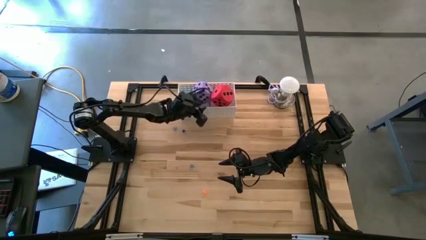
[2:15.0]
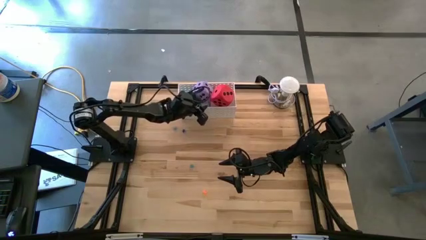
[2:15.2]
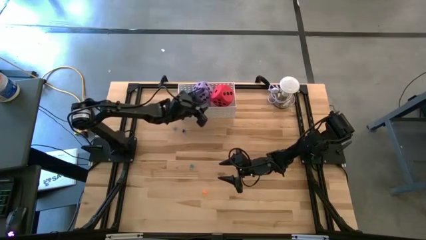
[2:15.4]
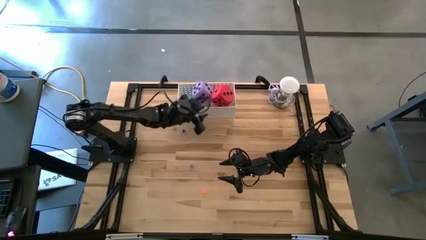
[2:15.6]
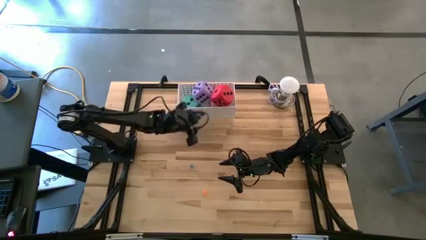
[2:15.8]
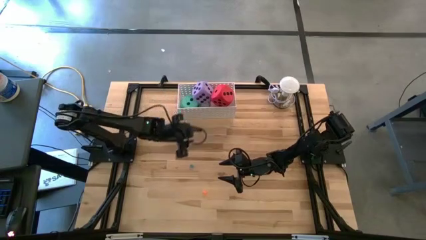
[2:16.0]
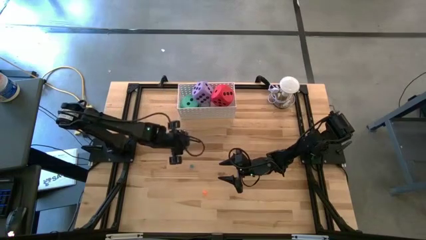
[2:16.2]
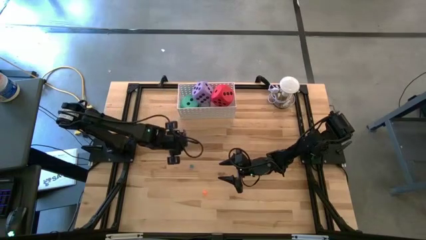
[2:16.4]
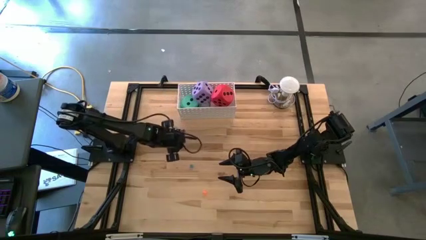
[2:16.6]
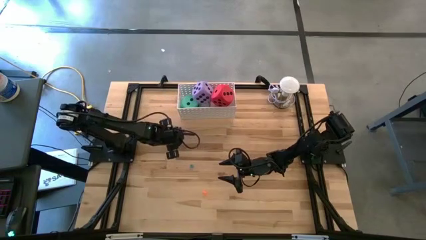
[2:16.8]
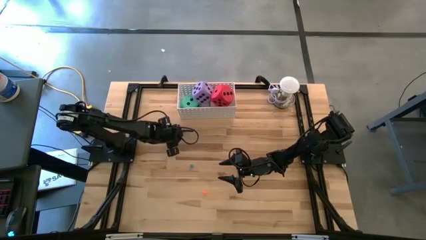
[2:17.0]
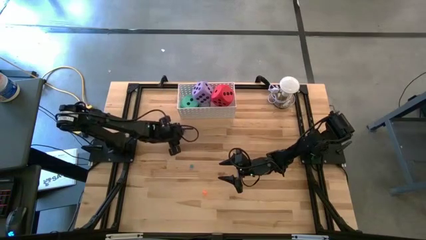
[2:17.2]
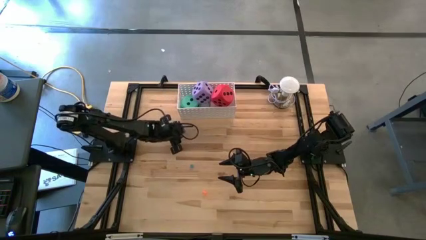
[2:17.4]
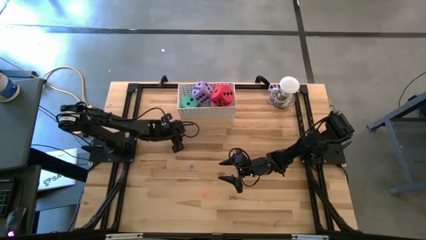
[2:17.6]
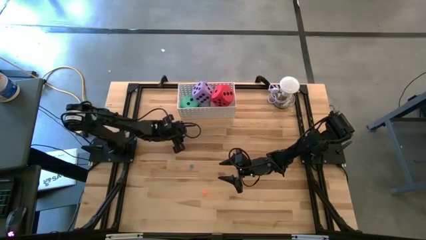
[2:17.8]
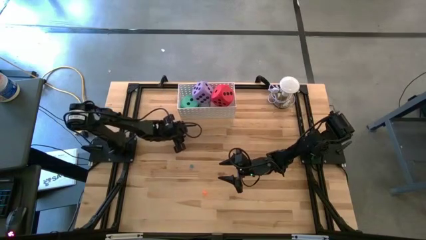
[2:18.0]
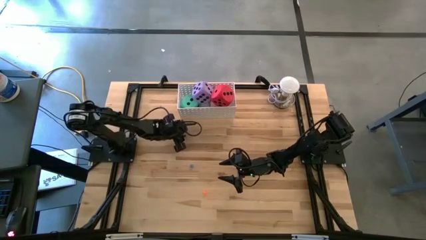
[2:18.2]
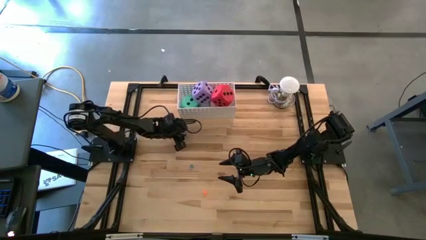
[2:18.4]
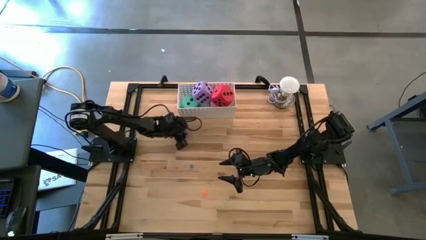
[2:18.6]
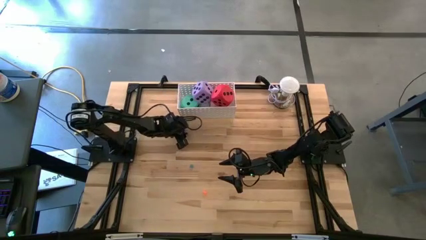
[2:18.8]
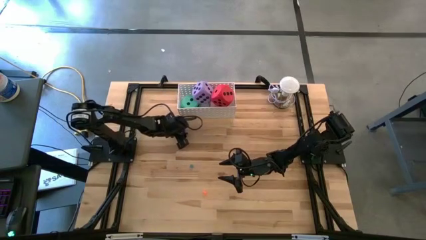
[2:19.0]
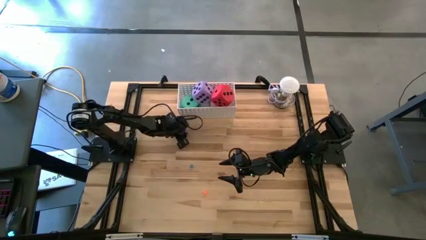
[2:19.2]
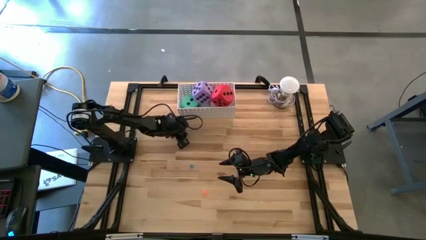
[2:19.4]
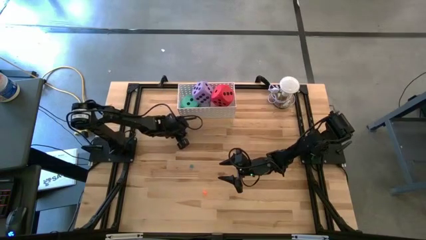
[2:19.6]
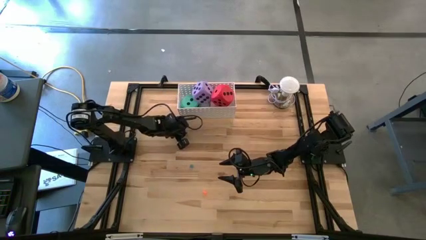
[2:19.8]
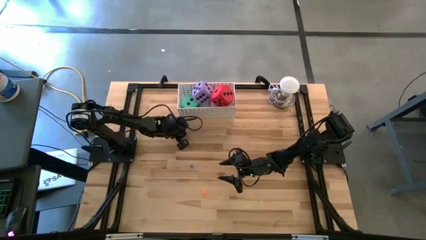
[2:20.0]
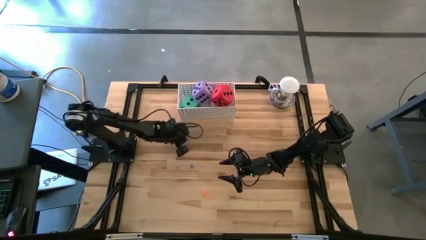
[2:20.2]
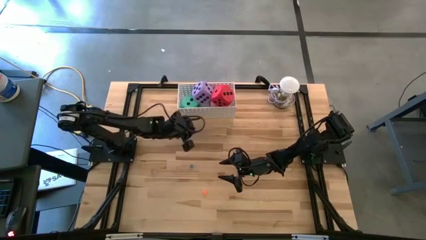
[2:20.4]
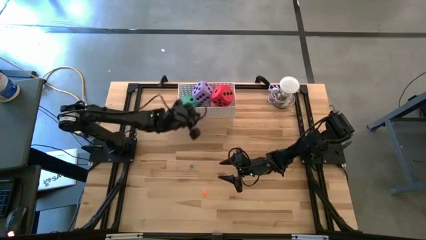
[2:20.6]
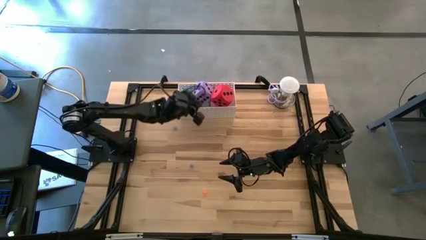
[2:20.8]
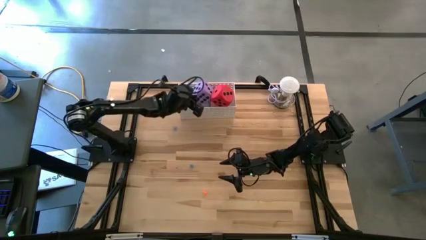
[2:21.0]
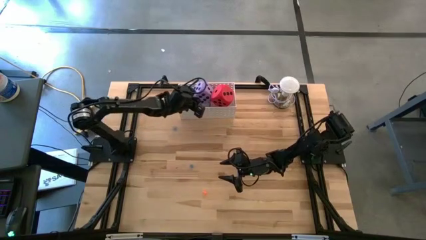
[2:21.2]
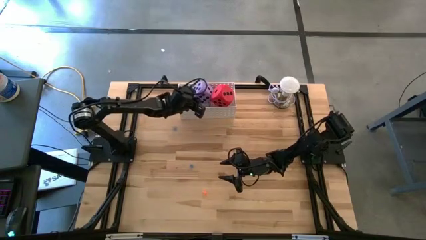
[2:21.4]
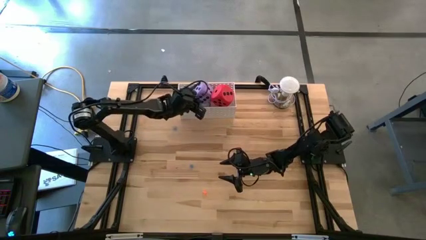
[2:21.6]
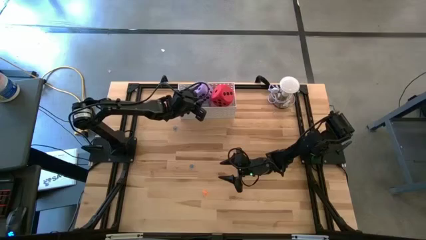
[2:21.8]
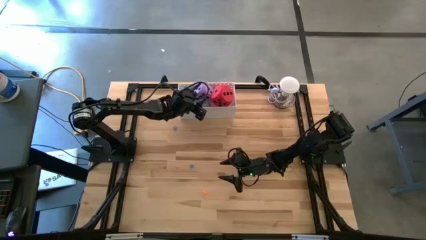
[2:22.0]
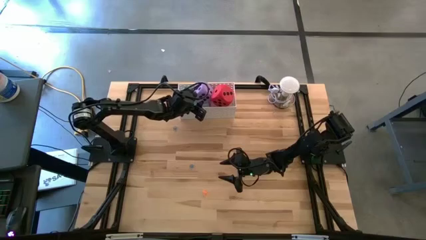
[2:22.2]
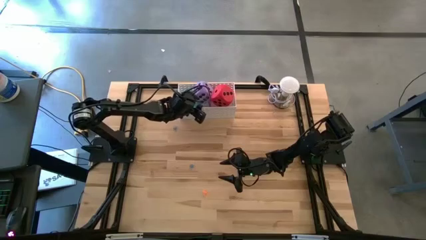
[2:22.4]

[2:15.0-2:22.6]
Task: Pick & Place Dice
Put the small dark blue dice into the white basket

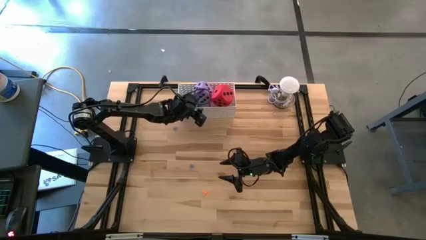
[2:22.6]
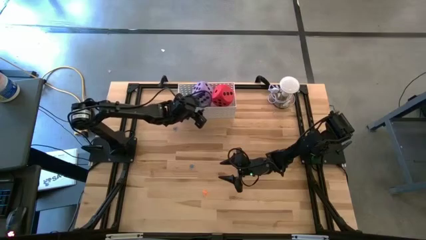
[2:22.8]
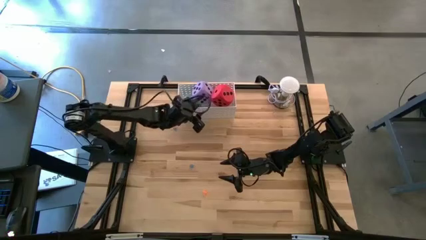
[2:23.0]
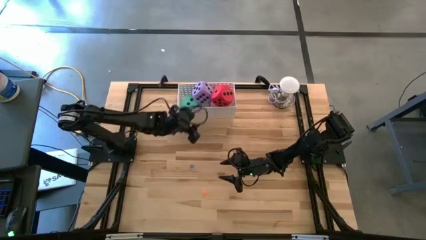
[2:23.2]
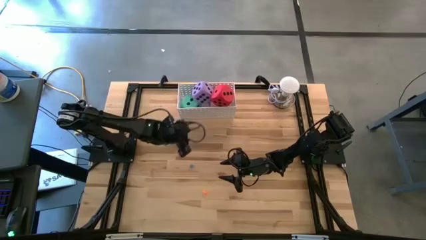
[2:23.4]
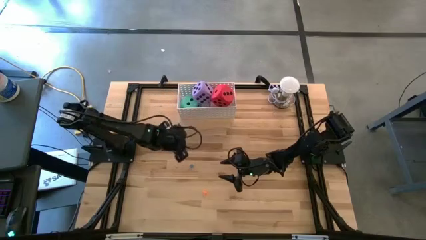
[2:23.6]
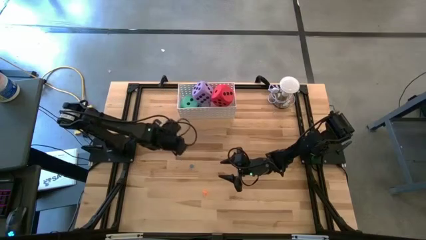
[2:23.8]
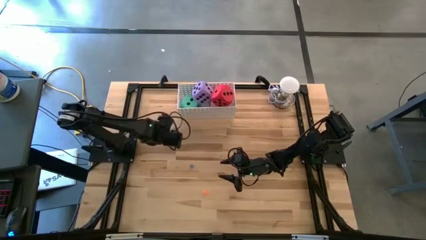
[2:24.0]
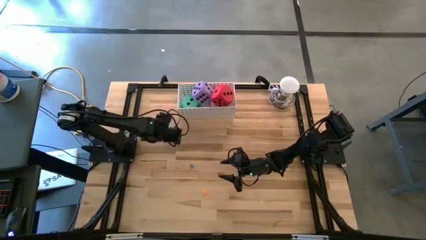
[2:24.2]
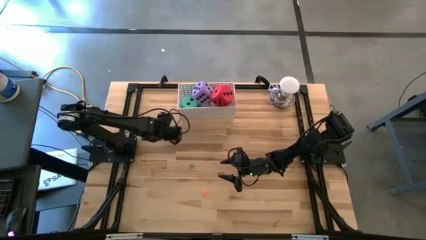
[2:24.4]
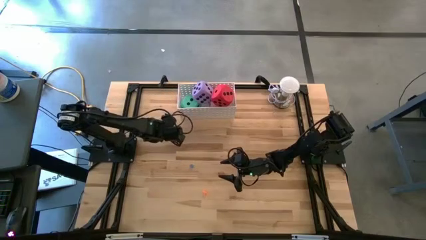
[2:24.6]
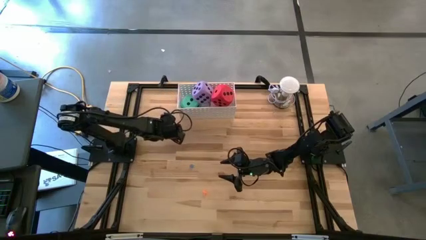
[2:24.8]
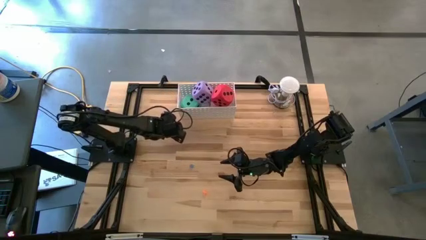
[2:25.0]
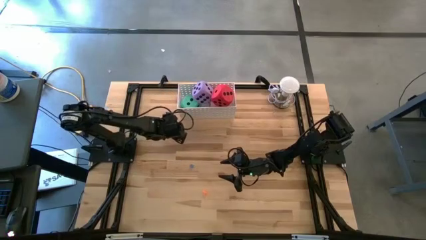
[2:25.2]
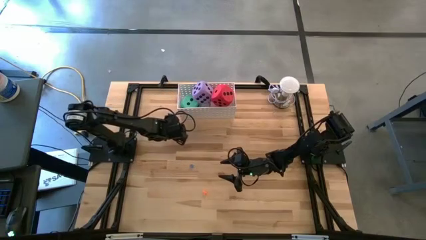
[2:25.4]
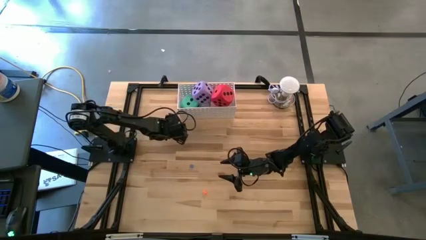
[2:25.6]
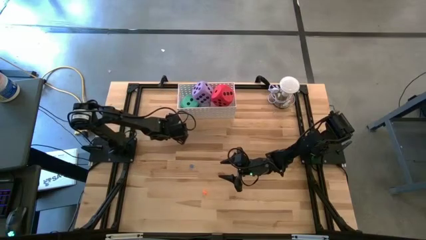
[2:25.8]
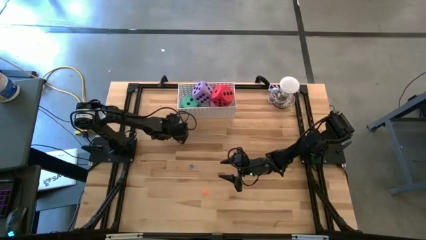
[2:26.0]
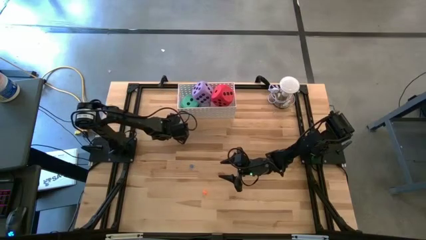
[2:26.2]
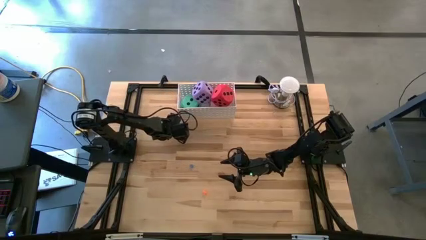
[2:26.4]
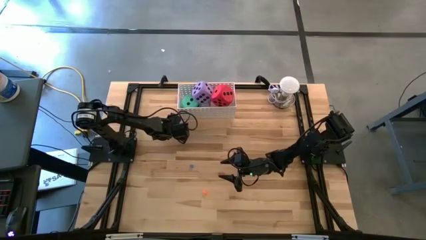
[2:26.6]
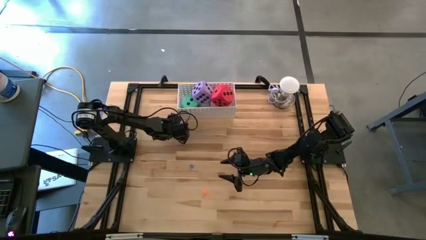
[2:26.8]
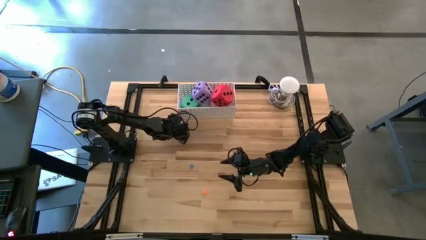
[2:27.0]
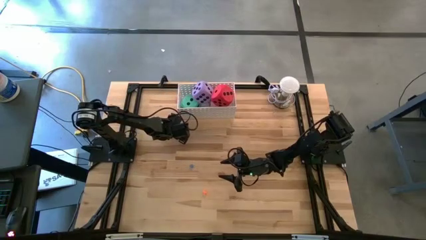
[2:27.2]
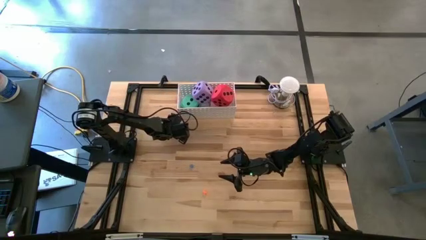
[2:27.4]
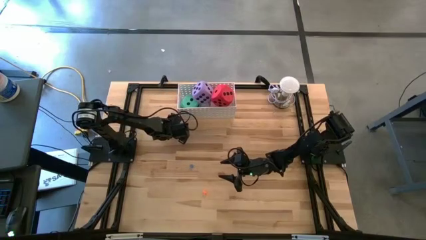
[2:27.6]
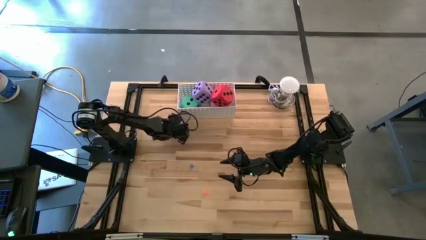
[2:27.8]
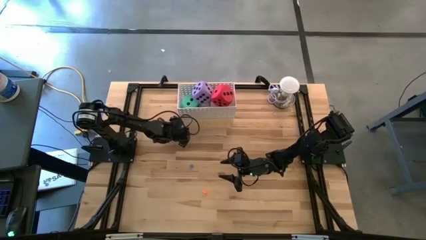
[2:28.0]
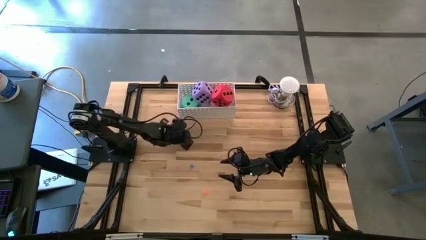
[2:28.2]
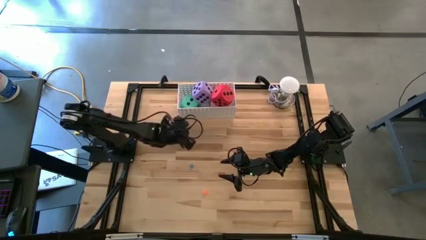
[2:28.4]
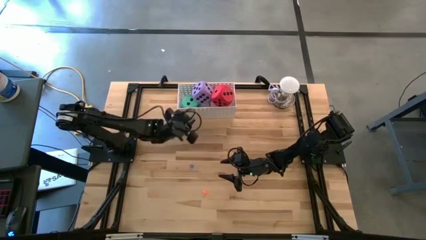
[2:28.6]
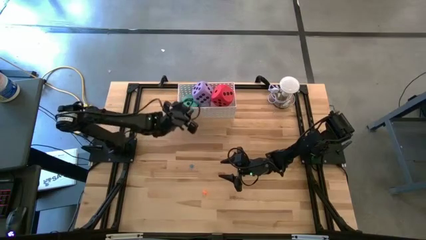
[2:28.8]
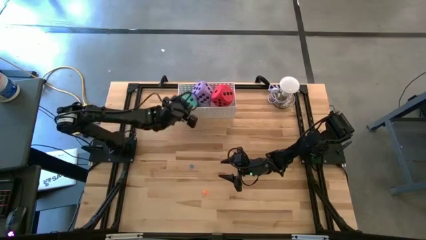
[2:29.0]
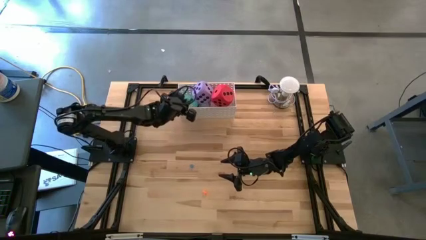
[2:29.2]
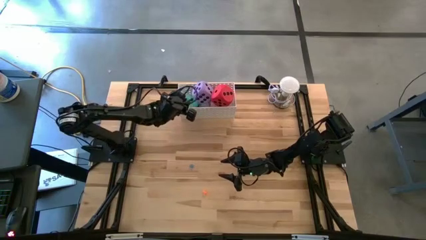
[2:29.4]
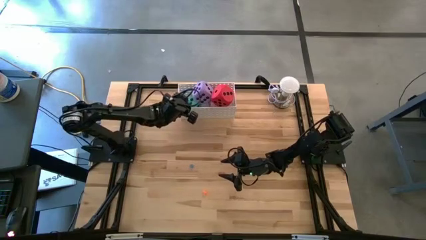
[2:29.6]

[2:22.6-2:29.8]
Put the small blue dice into the white basket
